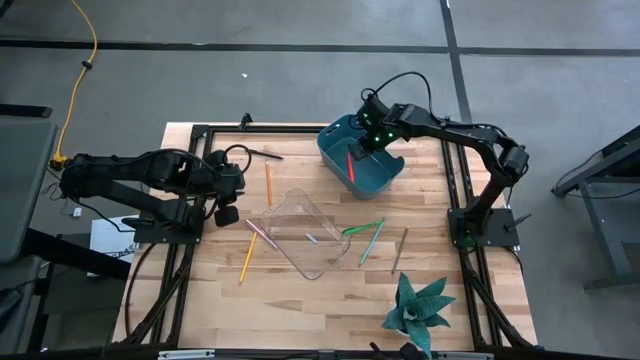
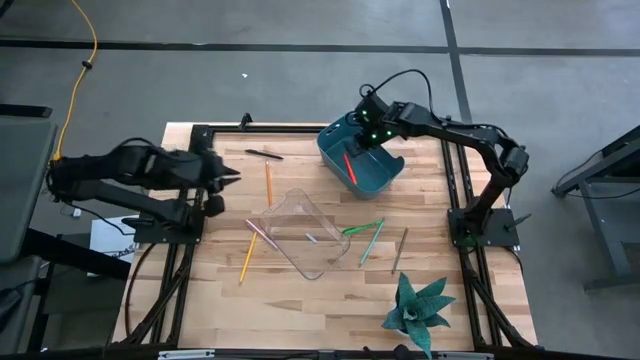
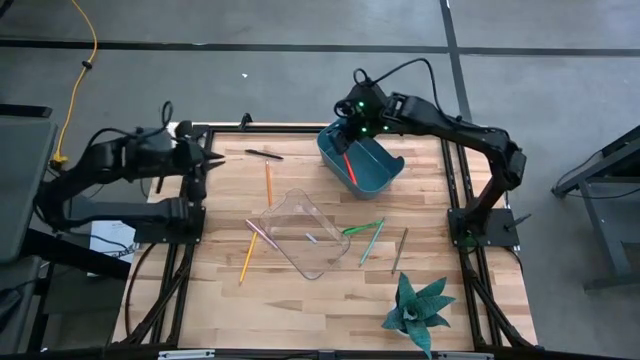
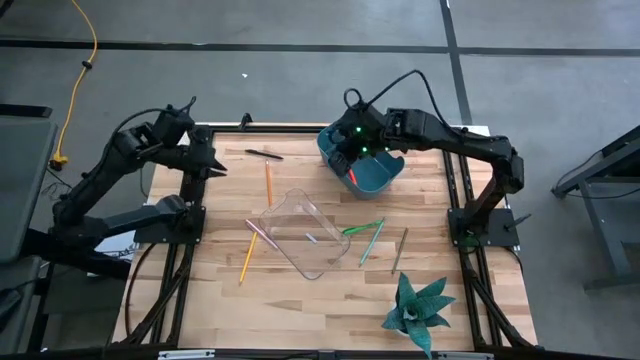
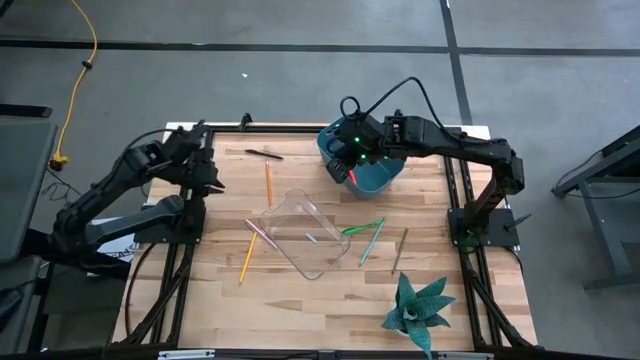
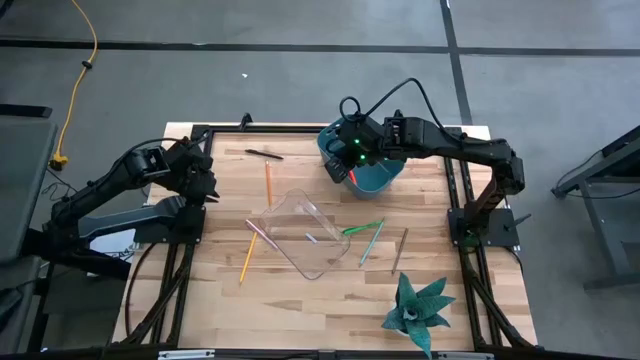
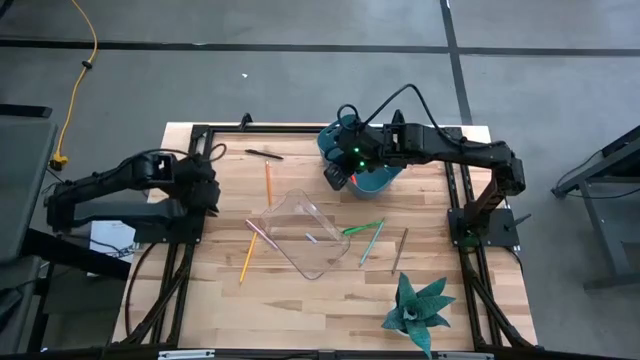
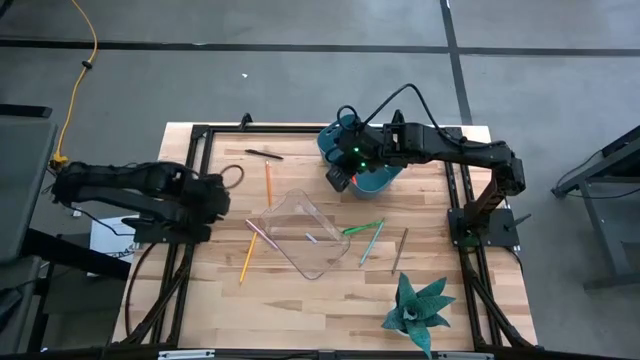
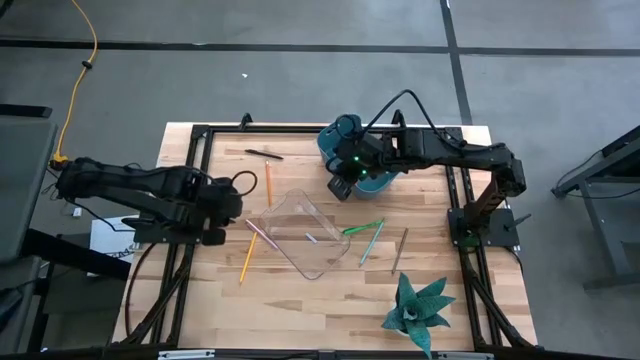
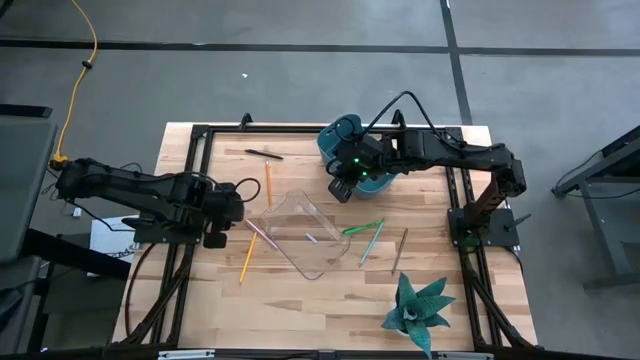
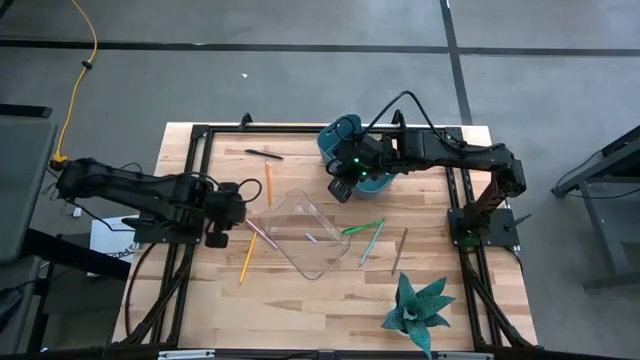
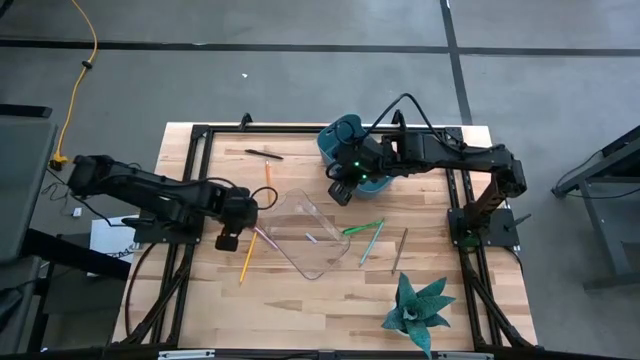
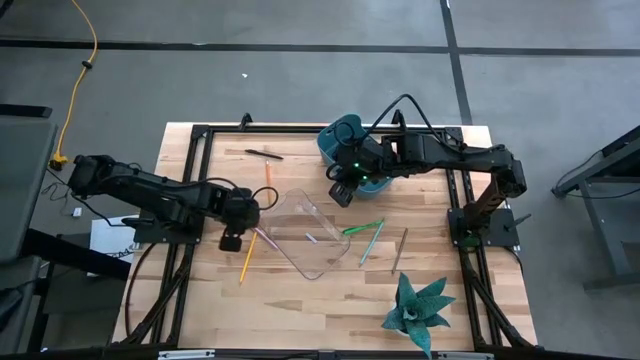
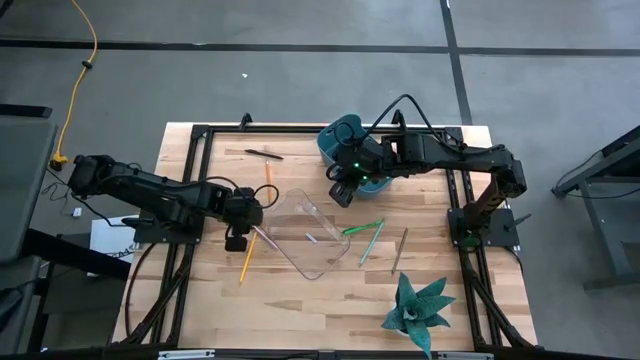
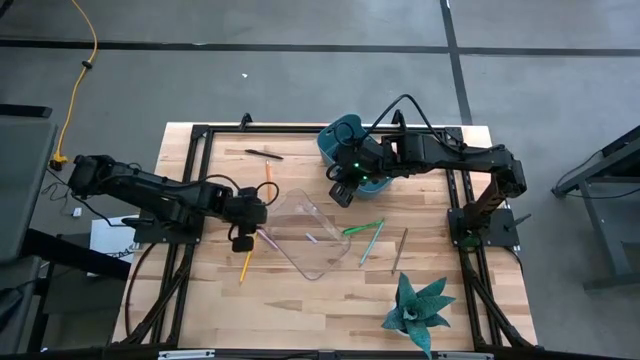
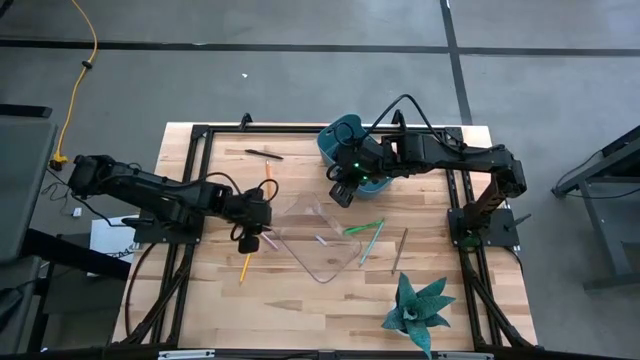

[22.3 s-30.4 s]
Task: Sort pens & pencils
Adjust the transparent bin

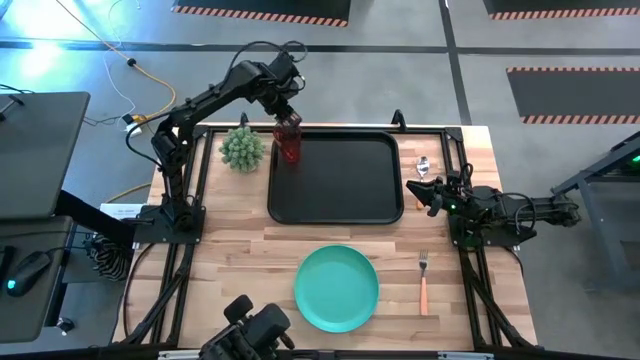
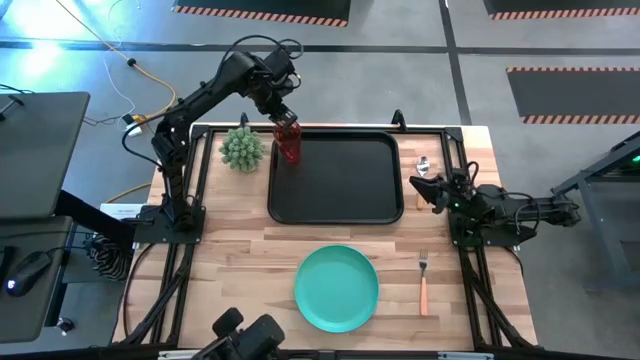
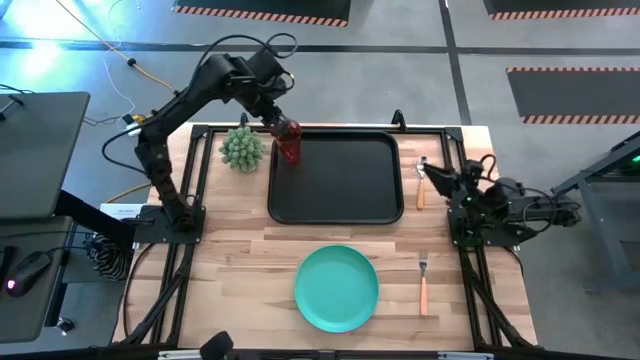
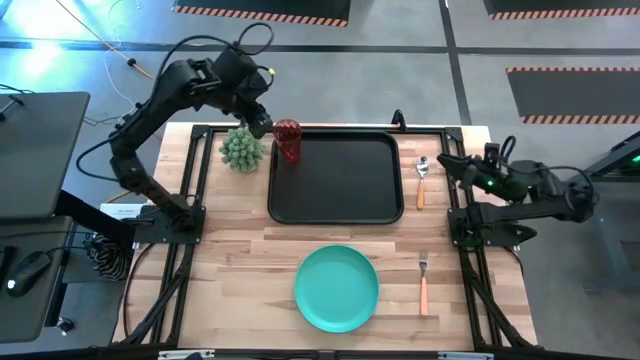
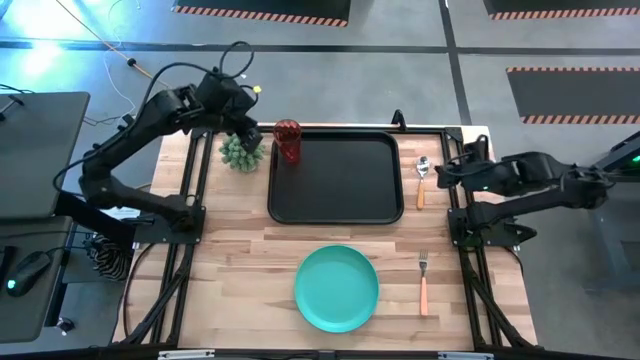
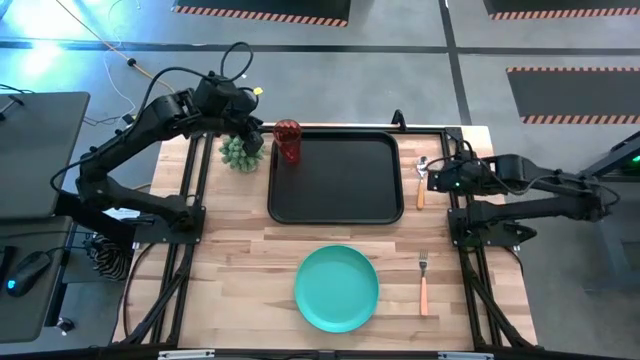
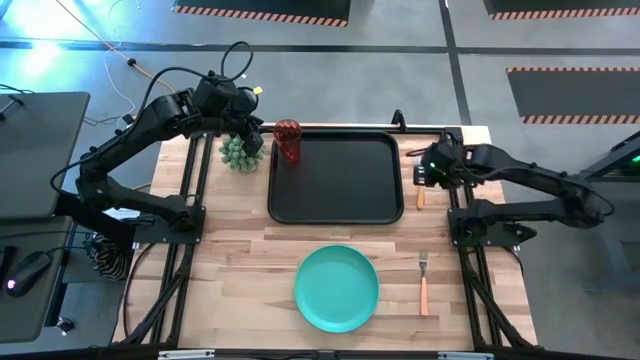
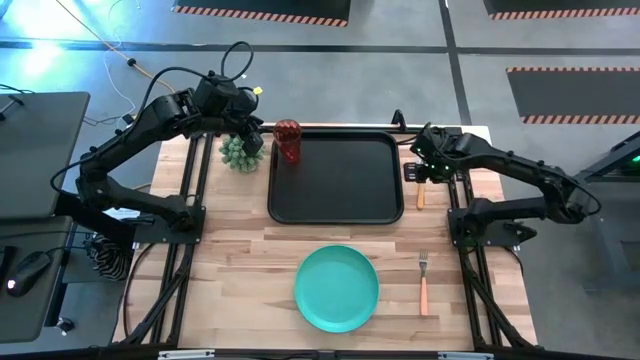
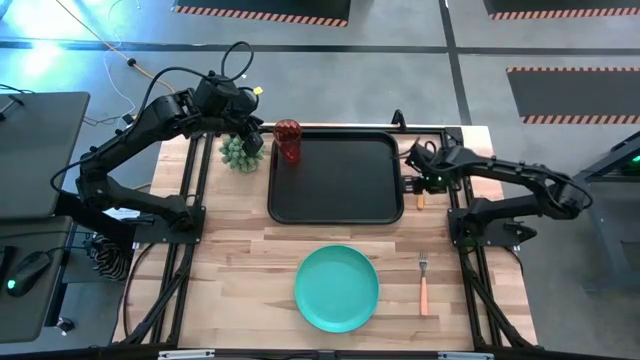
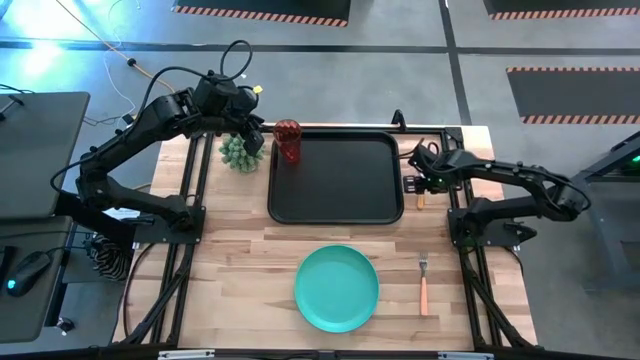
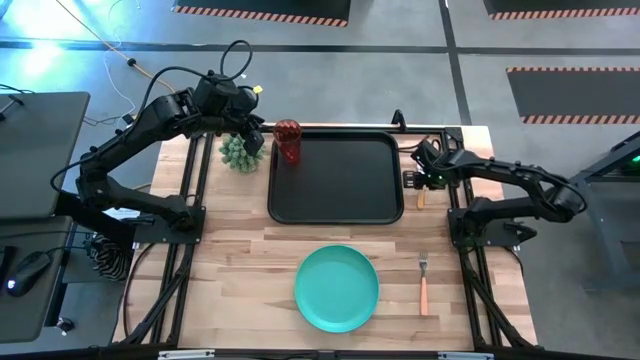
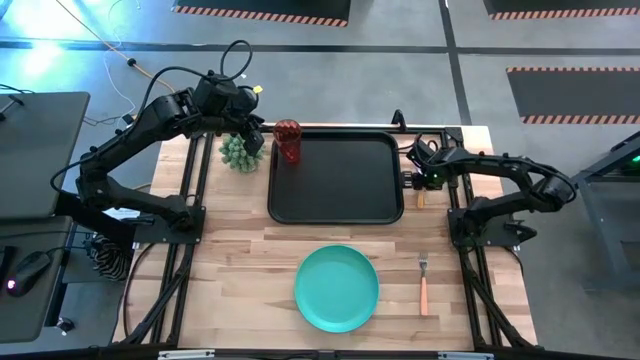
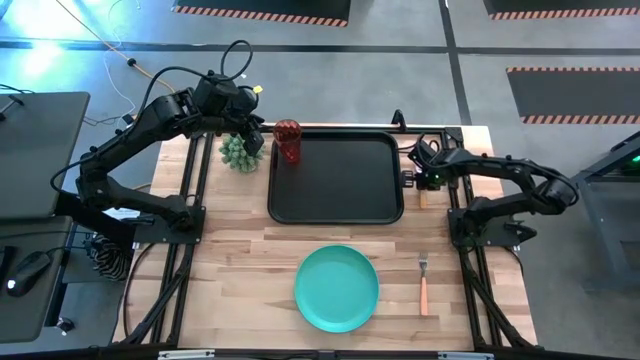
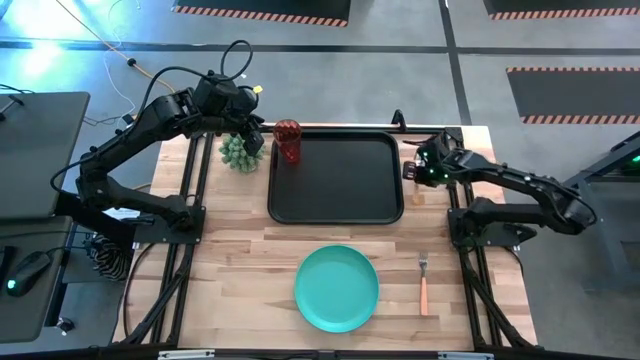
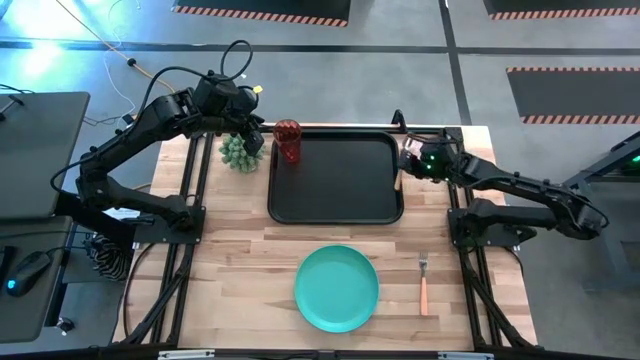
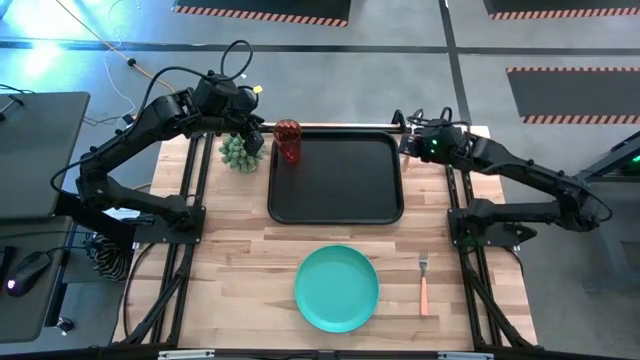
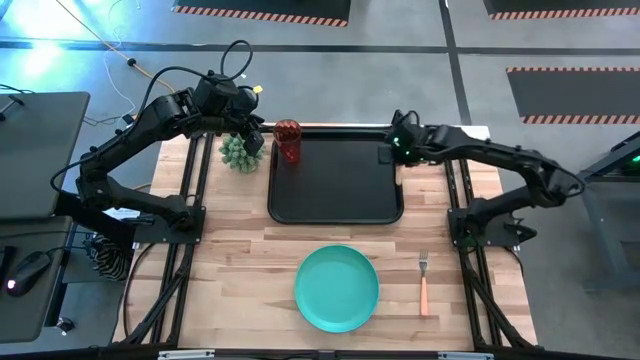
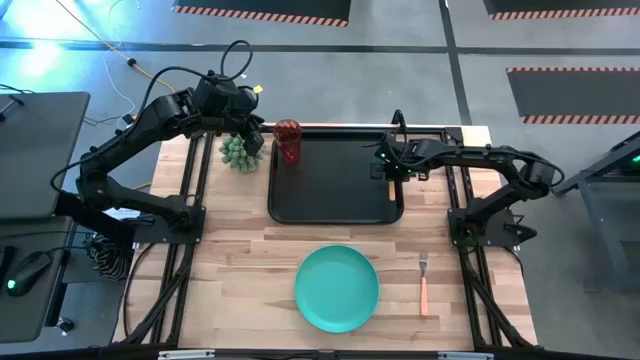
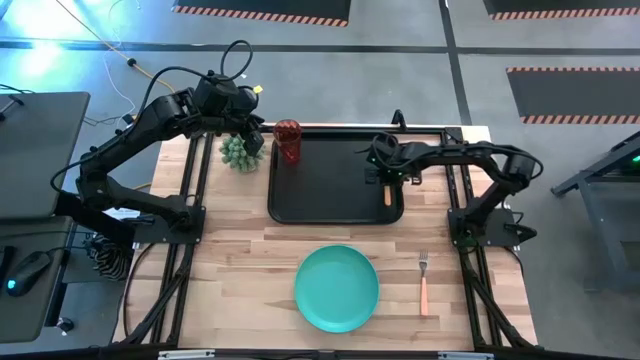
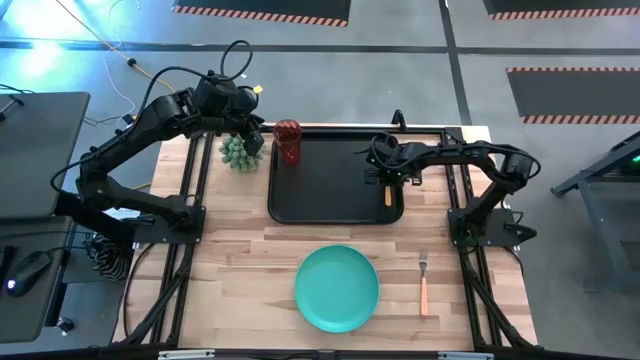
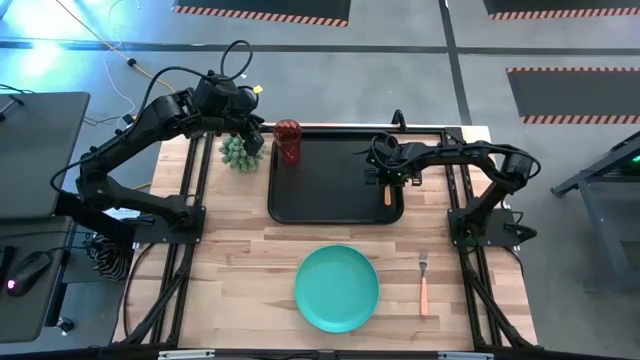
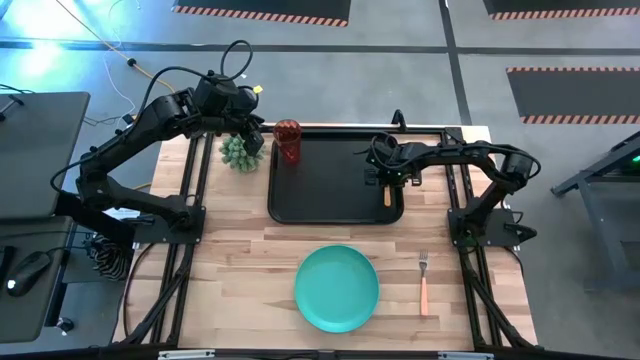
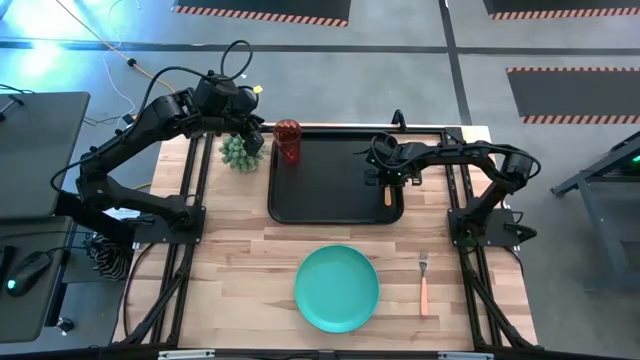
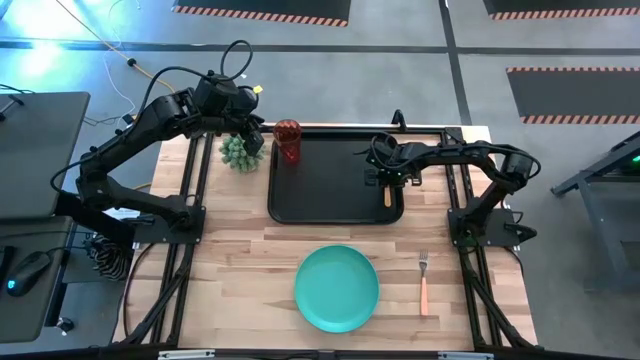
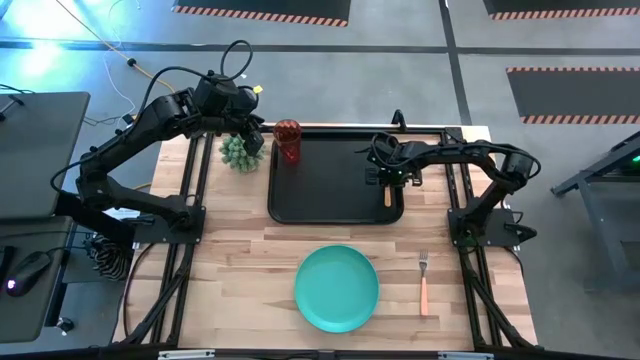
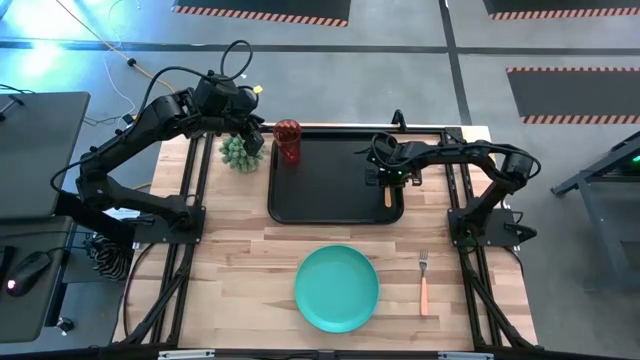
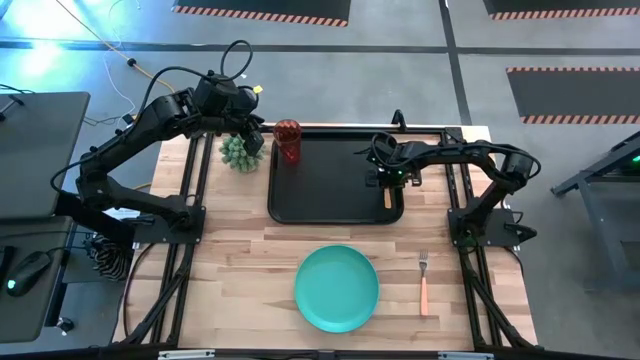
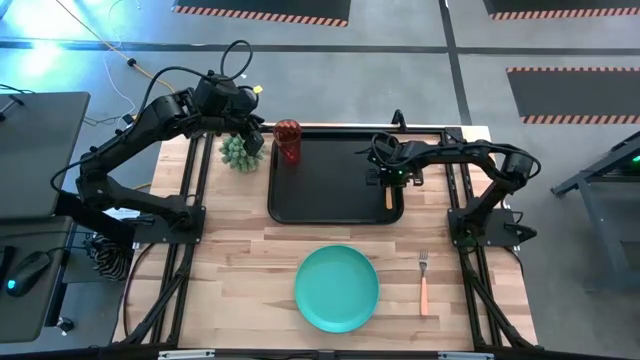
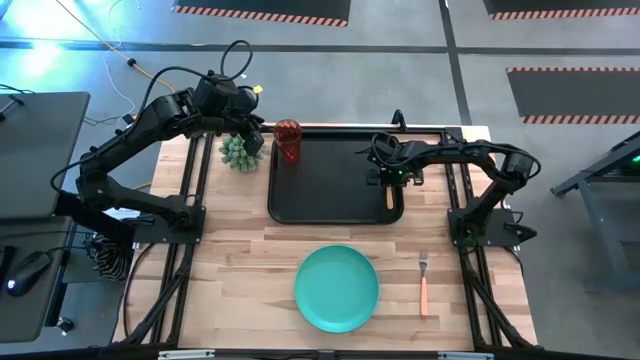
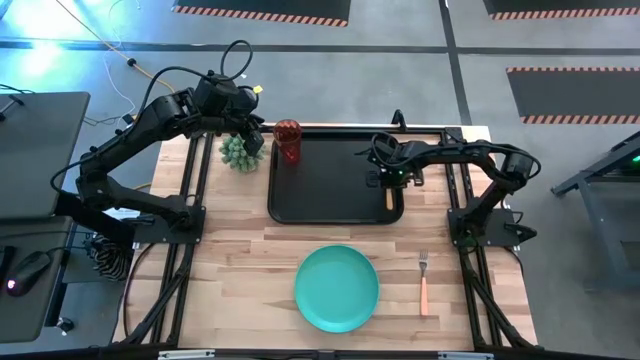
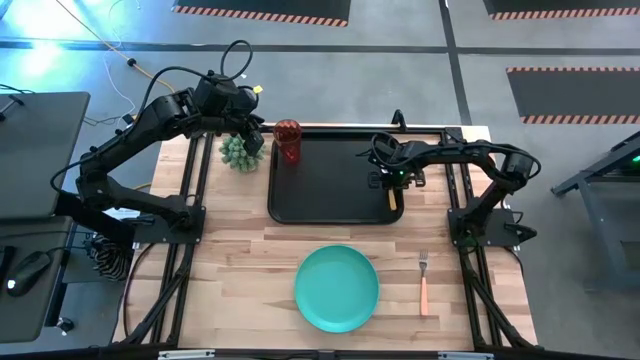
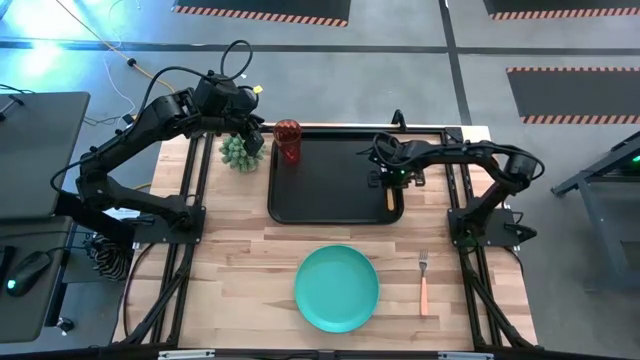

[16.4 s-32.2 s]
Task: Pick and place plate/cup/fork/spoon on tray
Put the yellow spoon on the black tray
